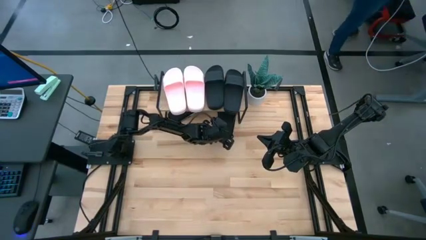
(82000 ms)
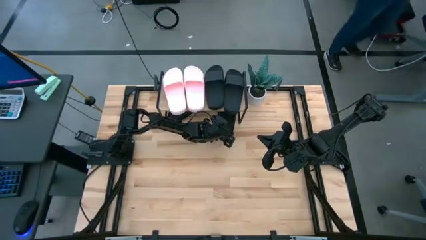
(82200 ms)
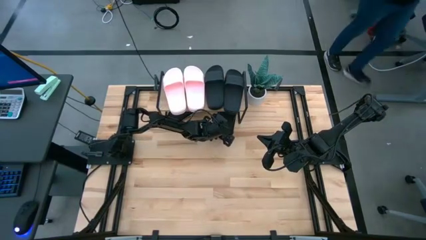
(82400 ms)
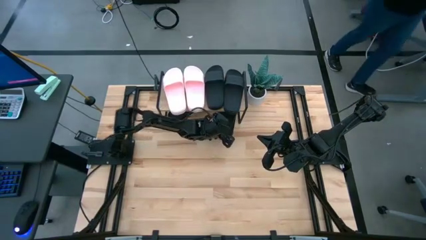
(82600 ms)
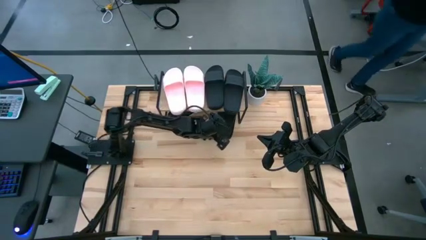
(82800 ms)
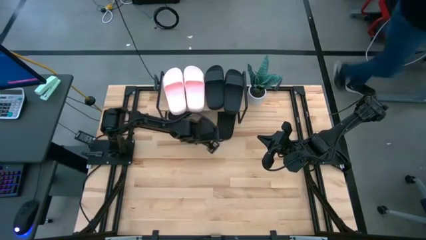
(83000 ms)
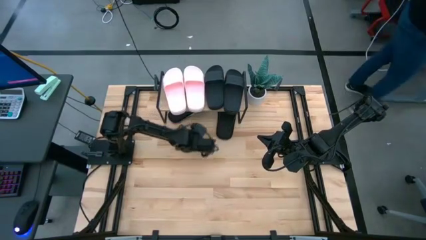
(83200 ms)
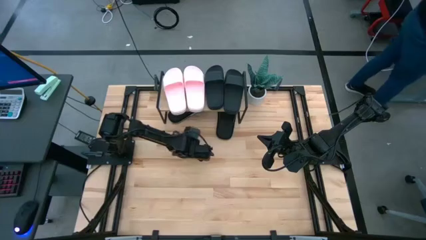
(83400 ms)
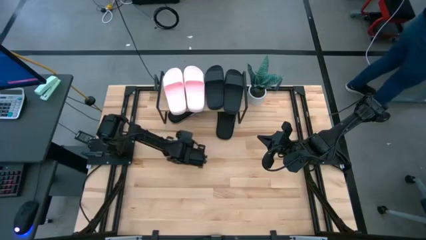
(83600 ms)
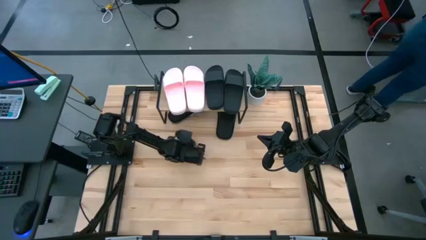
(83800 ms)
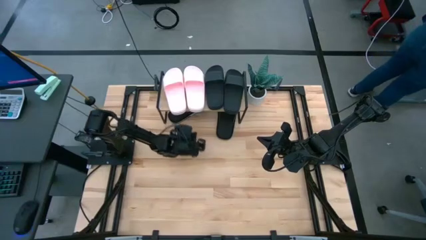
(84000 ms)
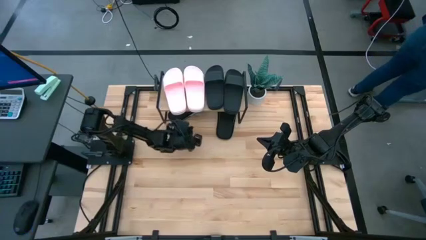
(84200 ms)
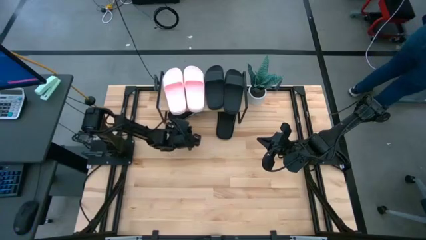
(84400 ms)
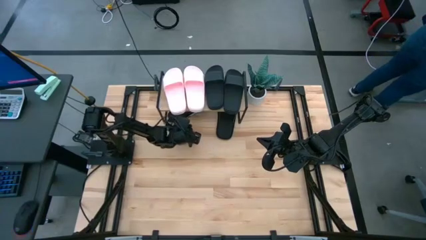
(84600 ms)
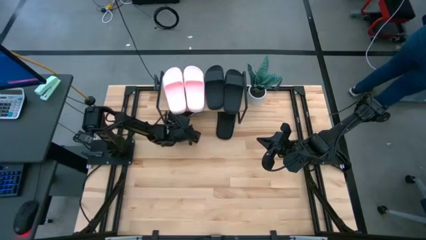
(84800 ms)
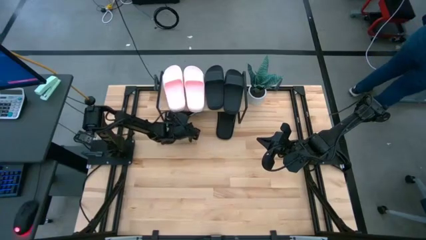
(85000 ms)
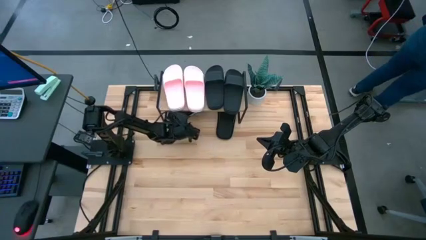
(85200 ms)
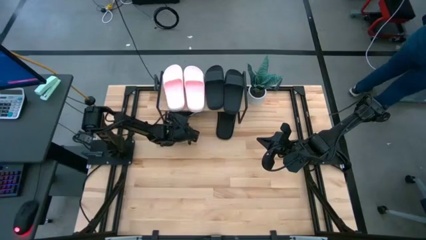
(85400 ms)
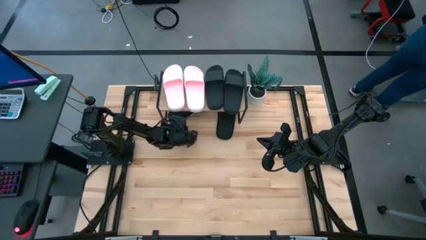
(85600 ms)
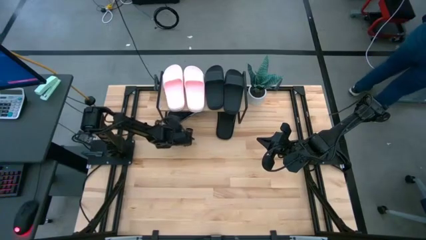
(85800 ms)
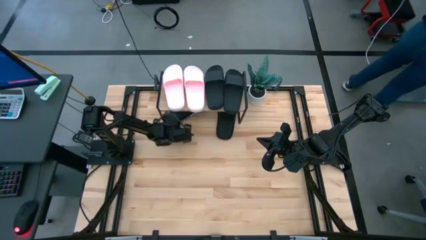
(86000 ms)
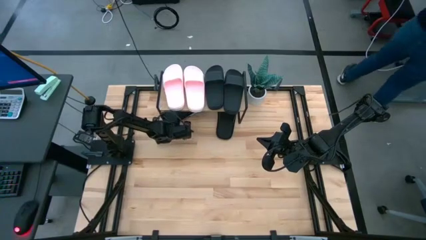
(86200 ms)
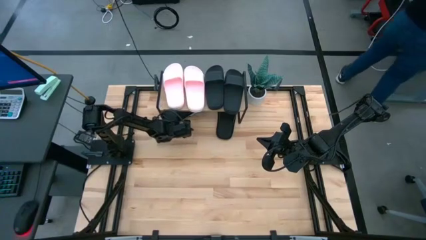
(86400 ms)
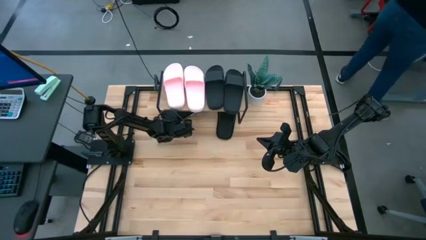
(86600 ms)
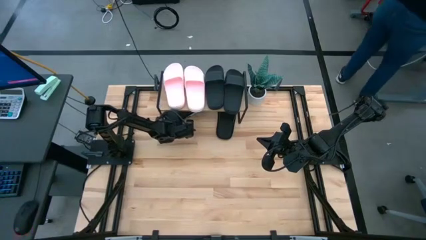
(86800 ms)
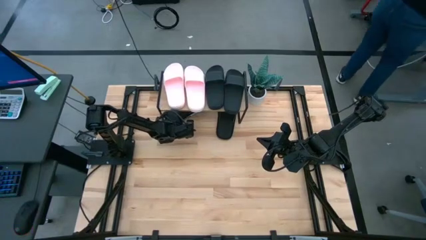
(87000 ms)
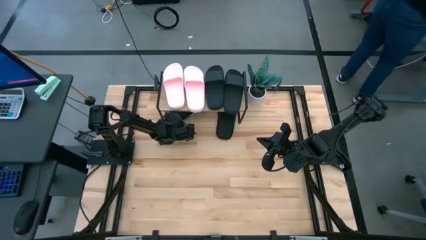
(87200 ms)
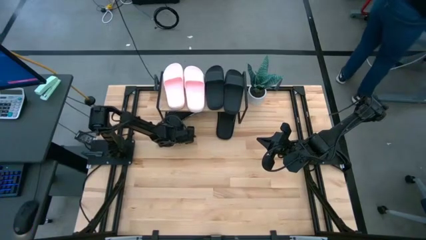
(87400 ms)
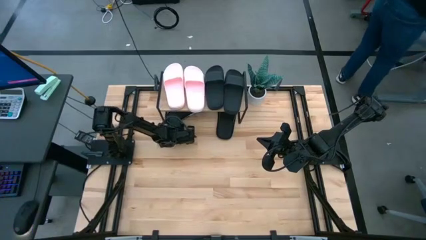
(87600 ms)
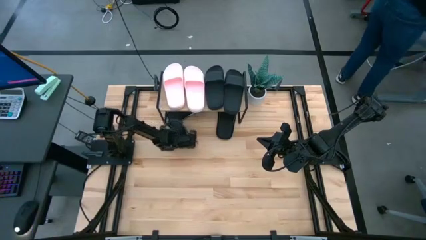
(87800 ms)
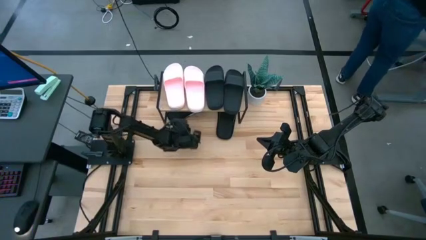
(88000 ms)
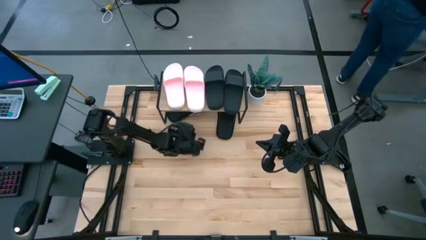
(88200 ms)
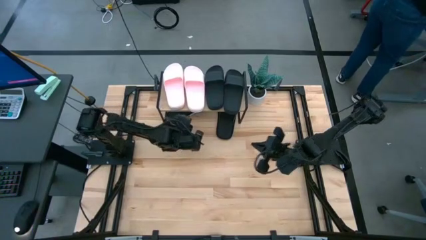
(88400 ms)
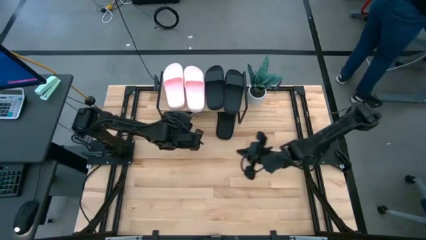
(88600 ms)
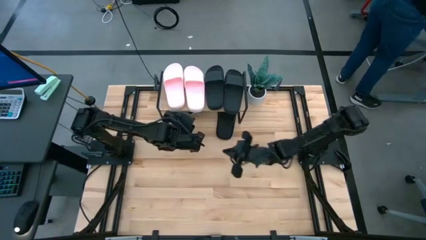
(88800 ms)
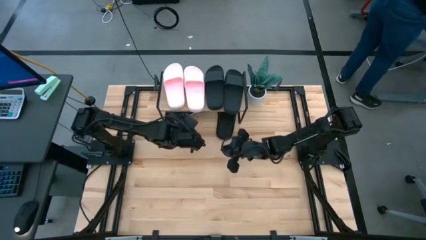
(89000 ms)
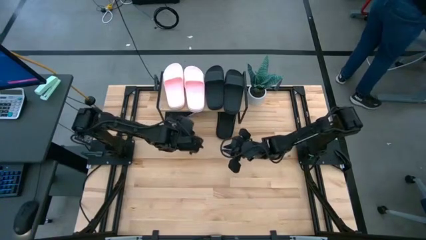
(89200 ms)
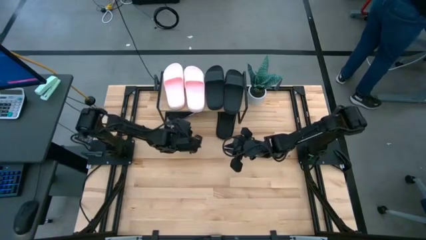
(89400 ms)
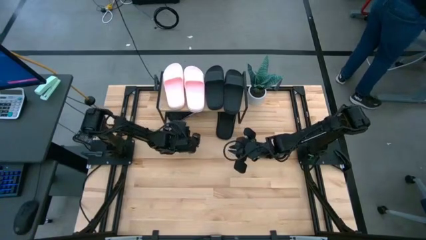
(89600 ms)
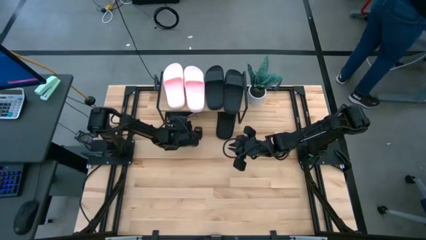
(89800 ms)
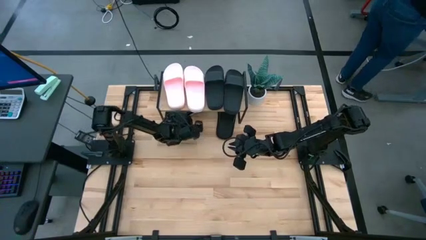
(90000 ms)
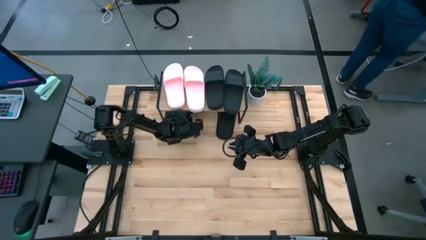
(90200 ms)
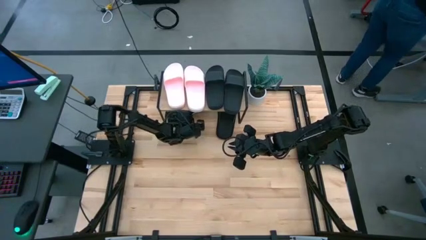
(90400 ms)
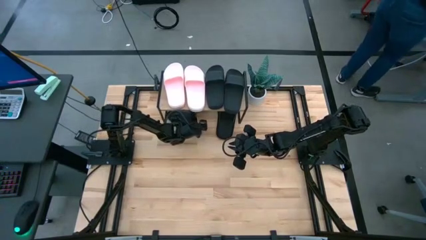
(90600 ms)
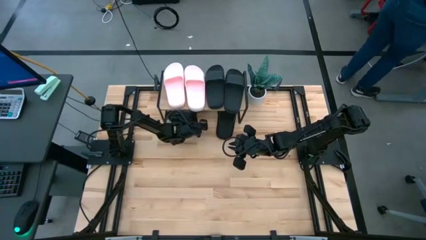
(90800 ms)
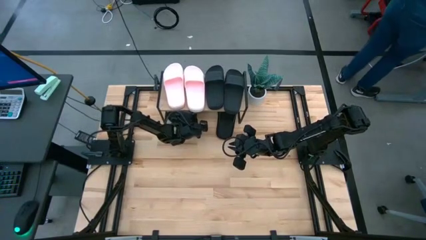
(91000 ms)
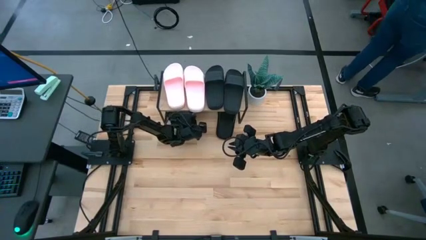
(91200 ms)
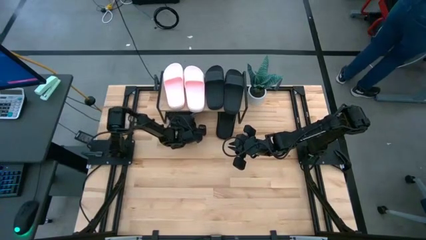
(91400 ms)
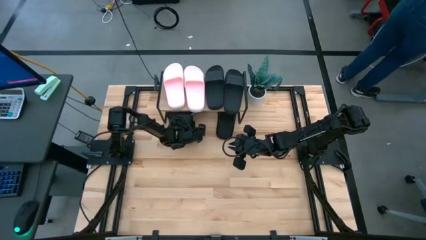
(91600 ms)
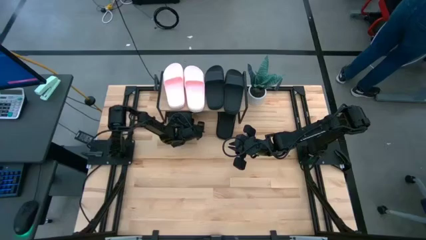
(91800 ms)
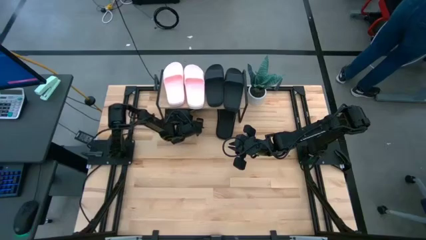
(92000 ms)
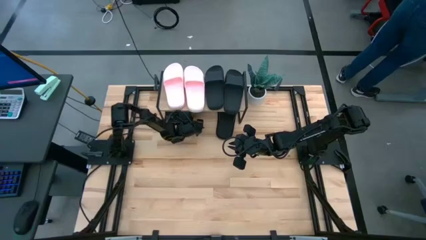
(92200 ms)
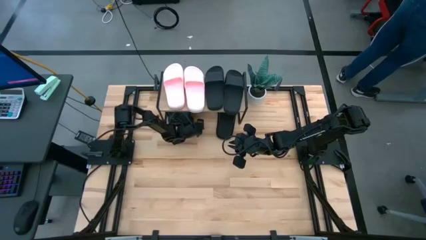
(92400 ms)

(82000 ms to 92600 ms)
Task: Pick and place slides into the shelf
Adjust the left black slipper under the shelf

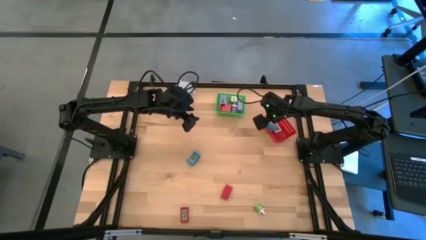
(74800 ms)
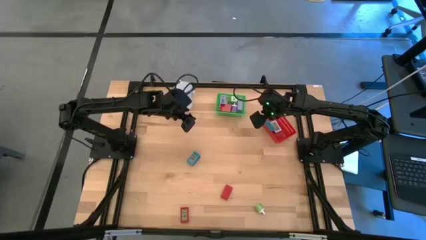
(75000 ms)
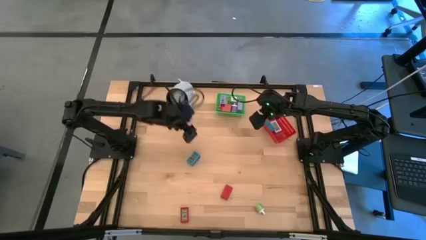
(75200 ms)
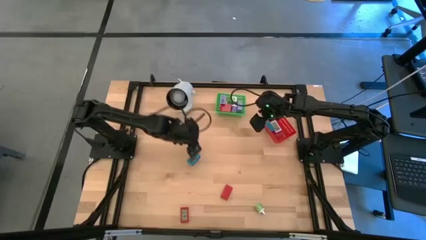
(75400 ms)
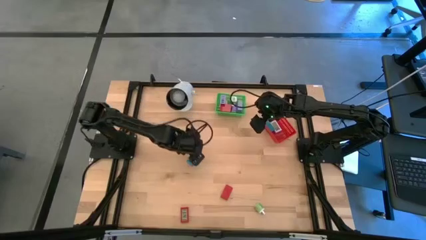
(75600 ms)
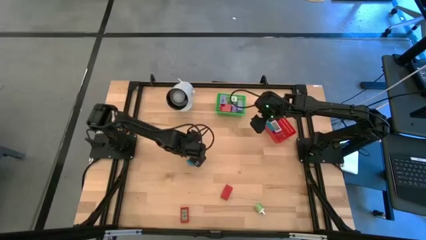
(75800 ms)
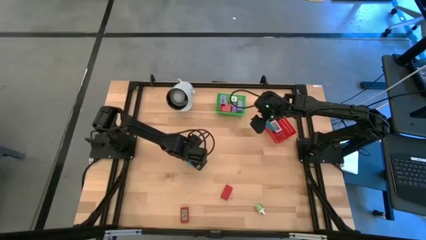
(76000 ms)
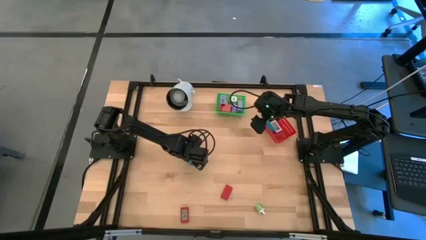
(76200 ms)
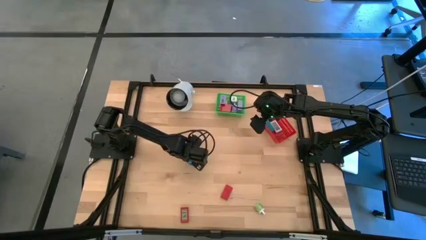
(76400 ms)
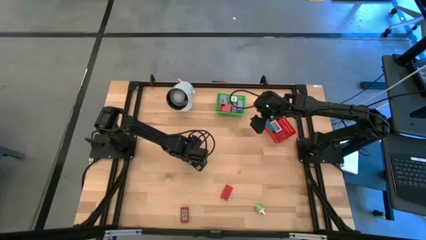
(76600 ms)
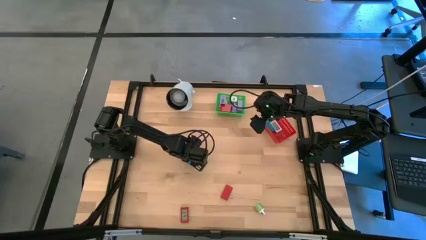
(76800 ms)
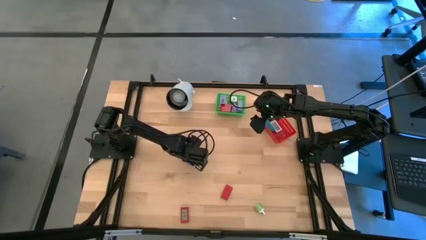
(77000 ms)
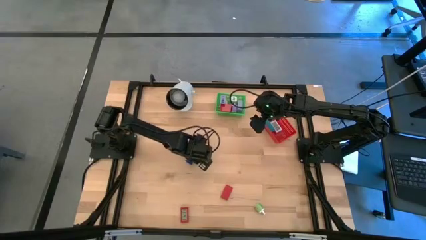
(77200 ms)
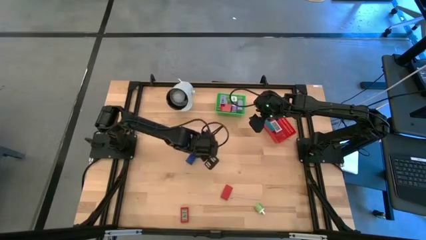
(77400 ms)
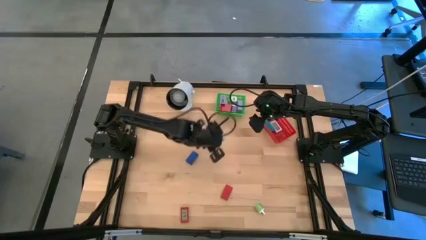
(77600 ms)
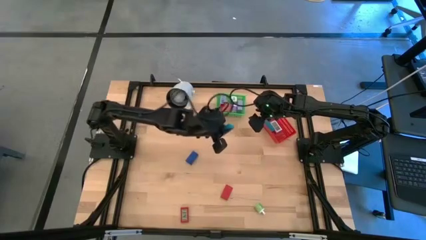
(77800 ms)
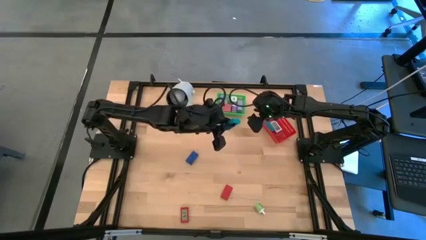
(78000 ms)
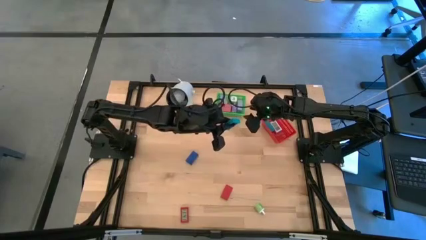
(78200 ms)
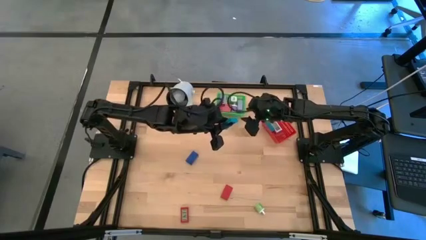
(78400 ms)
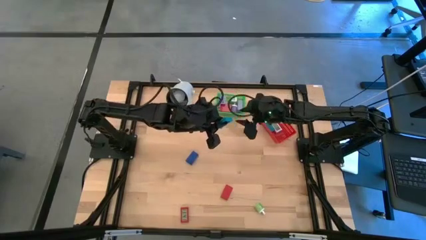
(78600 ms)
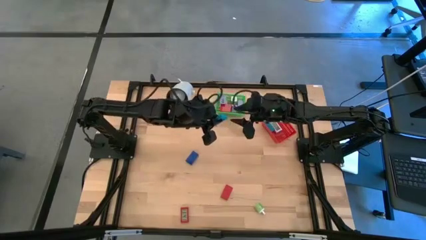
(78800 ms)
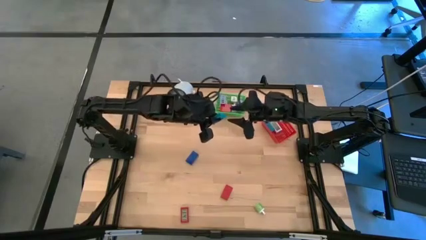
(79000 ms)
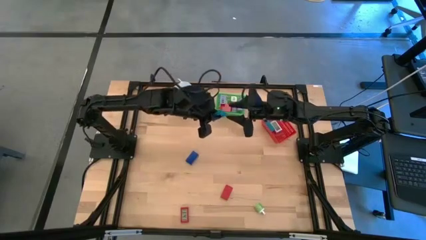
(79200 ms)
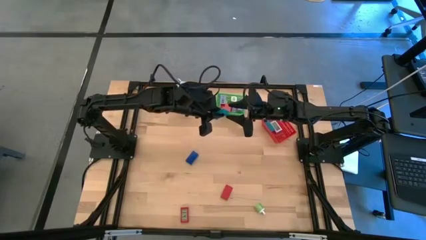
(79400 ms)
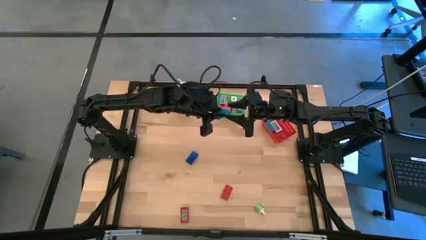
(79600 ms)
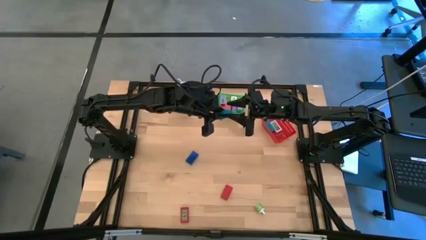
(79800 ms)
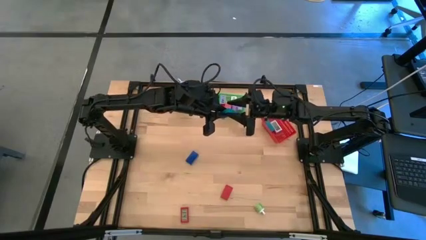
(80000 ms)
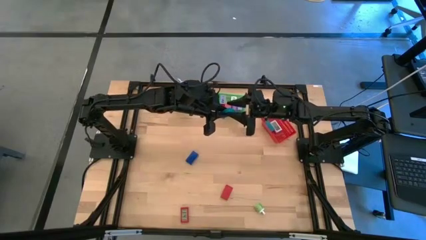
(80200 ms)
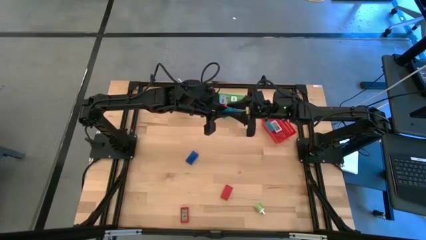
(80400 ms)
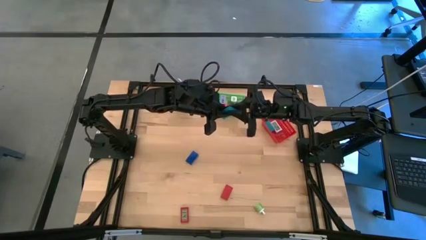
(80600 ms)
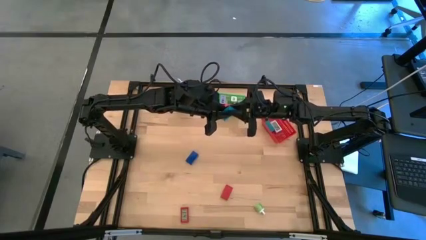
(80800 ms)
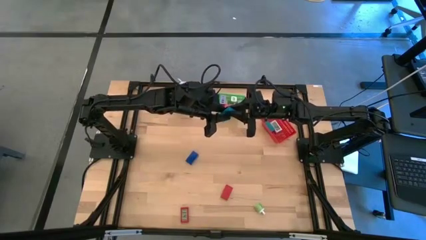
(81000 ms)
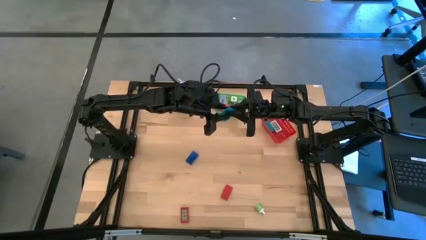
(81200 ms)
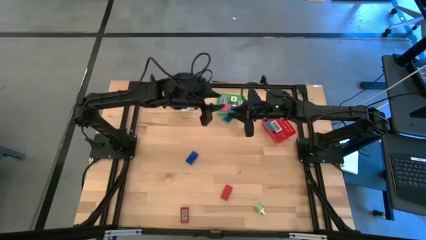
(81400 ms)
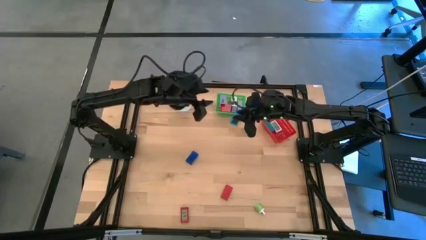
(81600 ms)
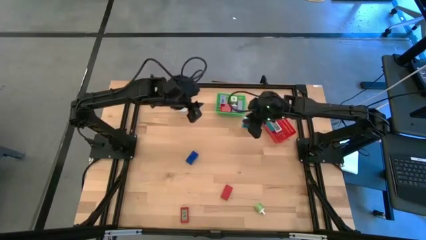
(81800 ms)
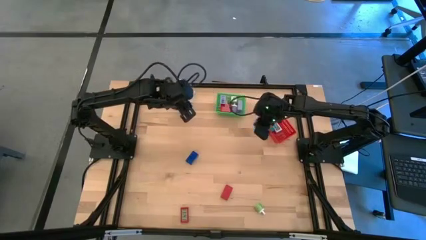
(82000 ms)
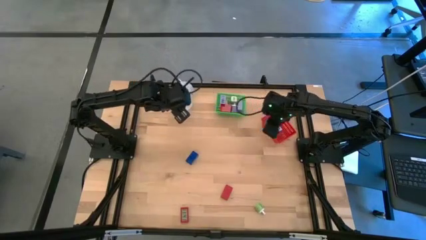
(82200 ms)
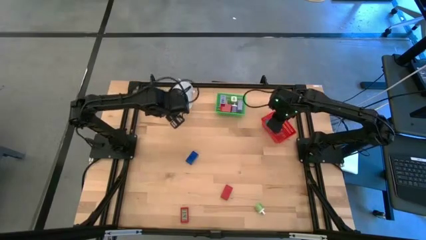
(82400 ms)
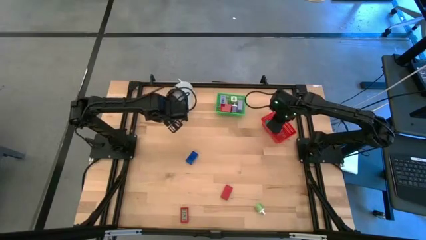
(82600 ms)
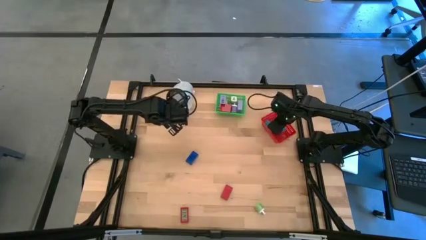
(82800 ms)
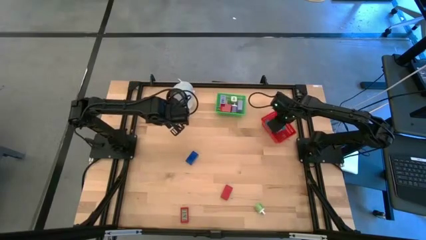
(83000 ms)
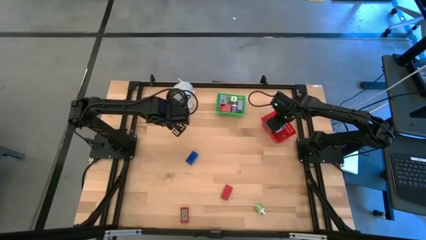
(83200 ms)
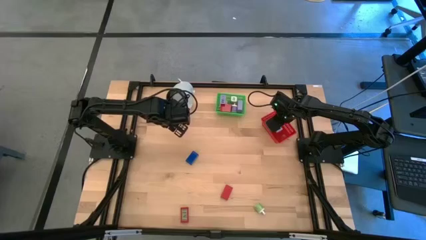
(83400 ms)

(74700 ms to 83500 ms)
Task: Pick & Place Office items
Put the blue digital timer into the red bin
